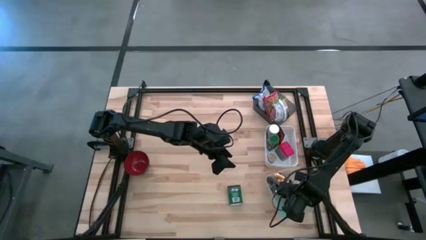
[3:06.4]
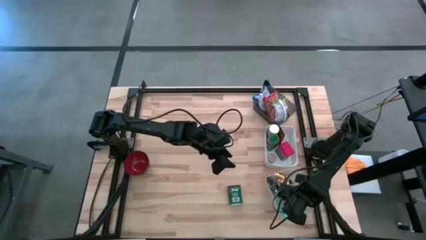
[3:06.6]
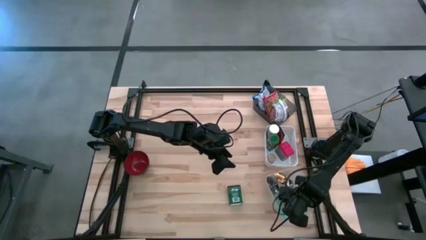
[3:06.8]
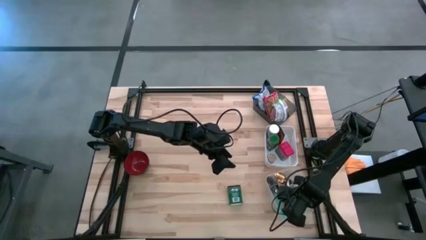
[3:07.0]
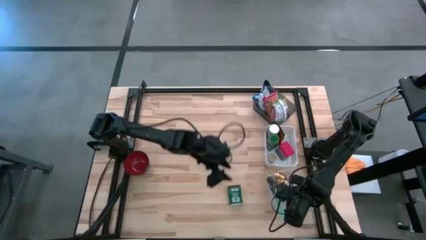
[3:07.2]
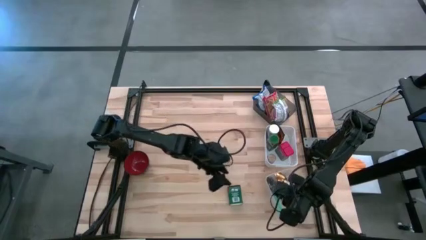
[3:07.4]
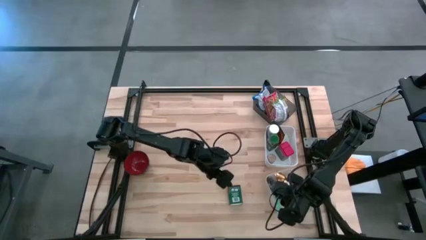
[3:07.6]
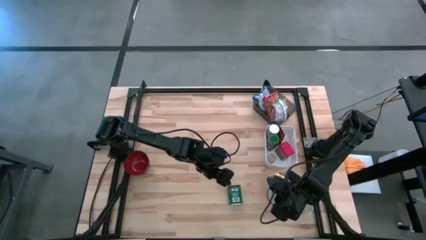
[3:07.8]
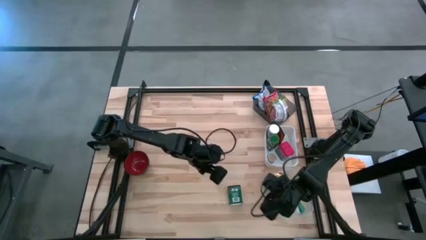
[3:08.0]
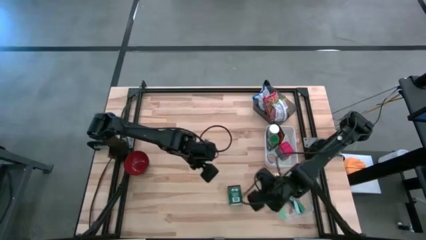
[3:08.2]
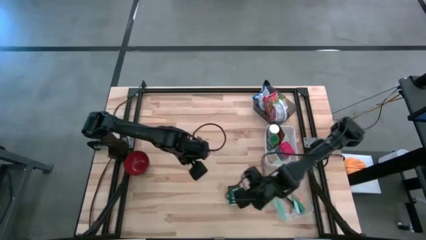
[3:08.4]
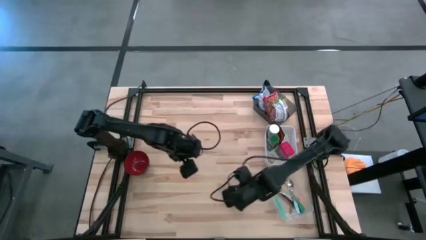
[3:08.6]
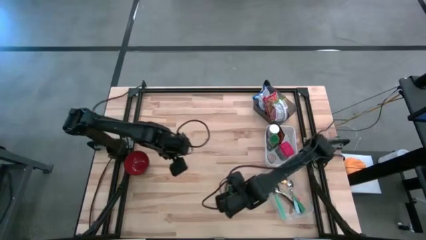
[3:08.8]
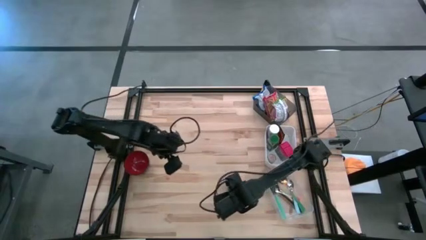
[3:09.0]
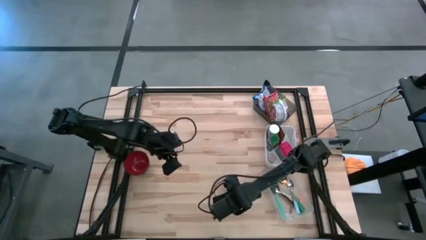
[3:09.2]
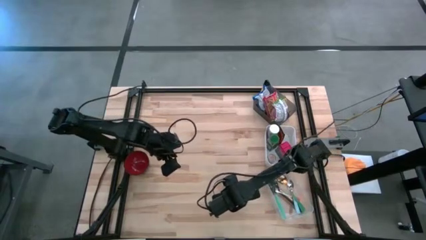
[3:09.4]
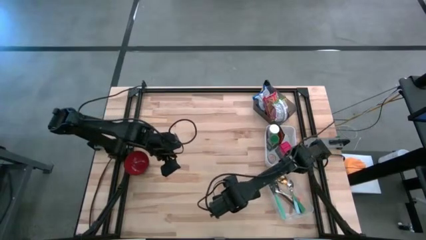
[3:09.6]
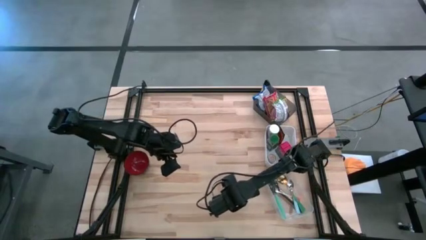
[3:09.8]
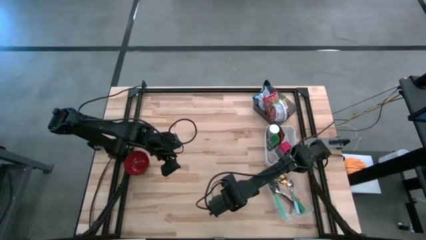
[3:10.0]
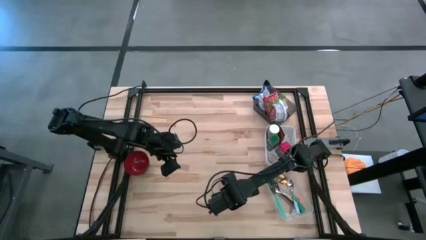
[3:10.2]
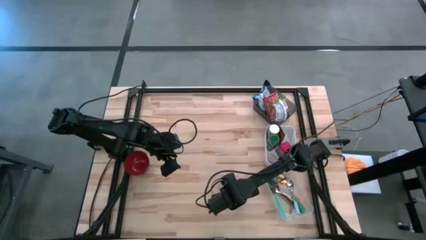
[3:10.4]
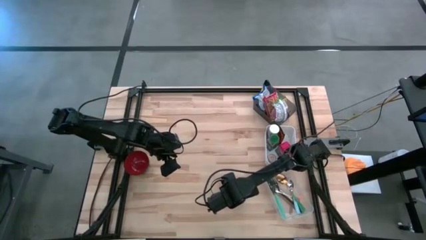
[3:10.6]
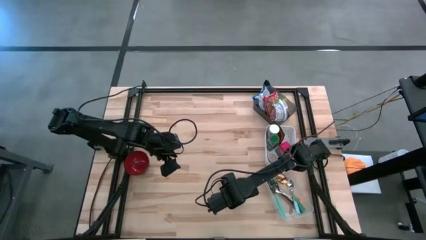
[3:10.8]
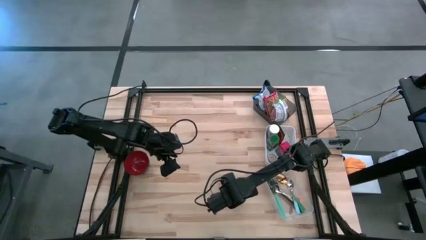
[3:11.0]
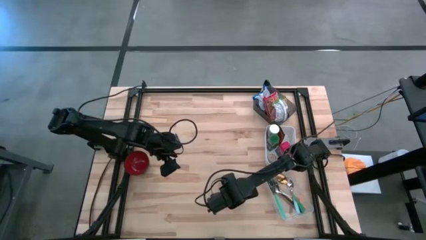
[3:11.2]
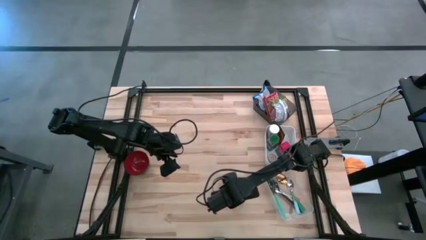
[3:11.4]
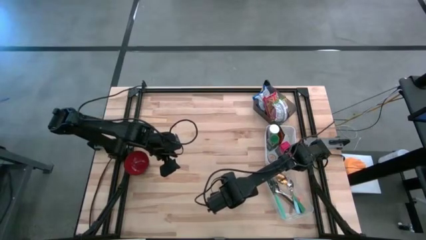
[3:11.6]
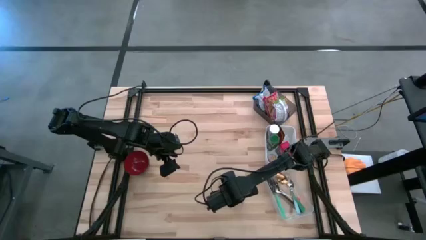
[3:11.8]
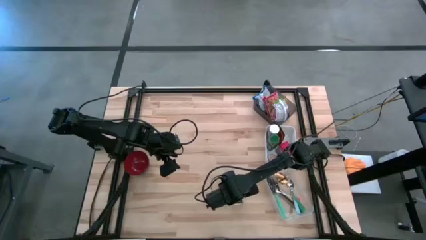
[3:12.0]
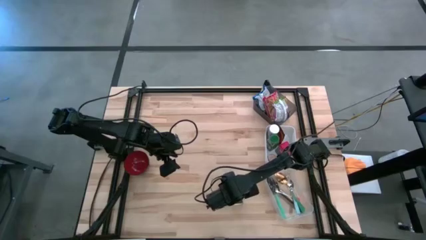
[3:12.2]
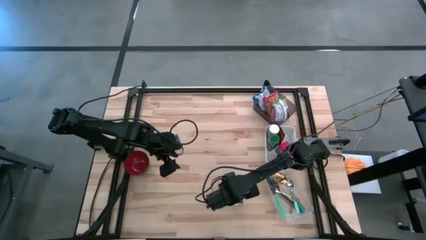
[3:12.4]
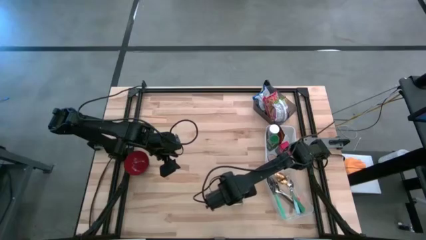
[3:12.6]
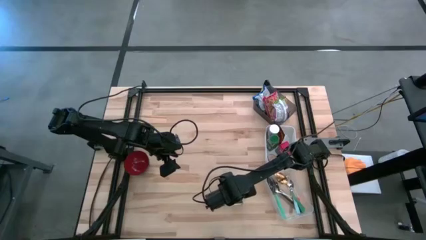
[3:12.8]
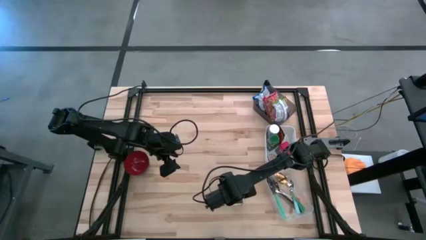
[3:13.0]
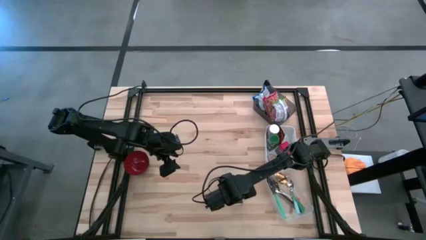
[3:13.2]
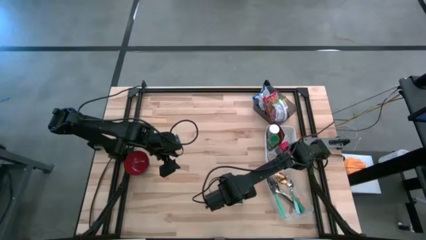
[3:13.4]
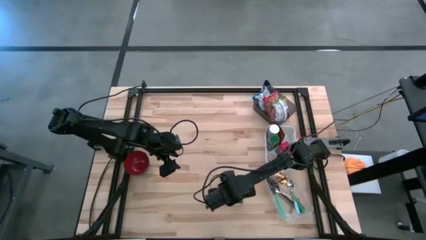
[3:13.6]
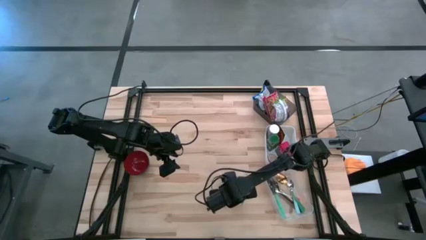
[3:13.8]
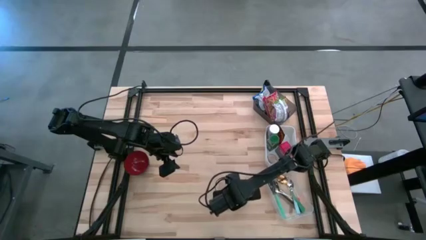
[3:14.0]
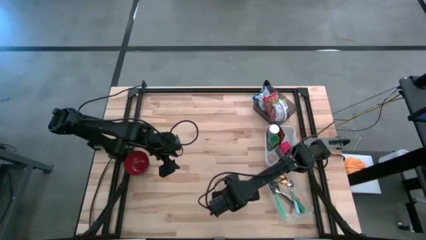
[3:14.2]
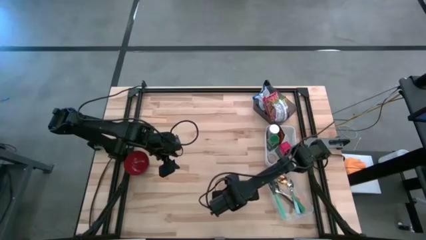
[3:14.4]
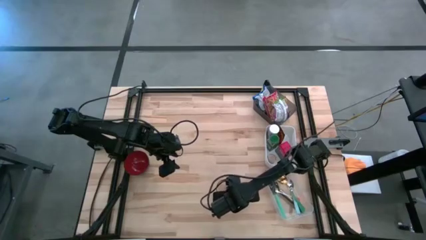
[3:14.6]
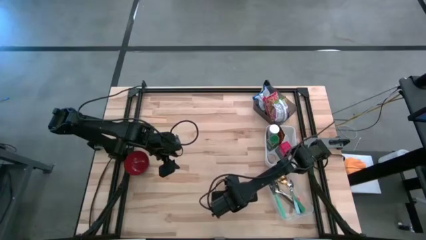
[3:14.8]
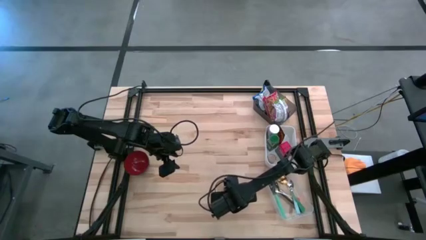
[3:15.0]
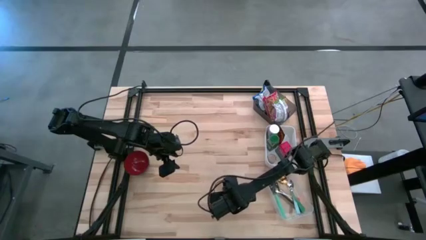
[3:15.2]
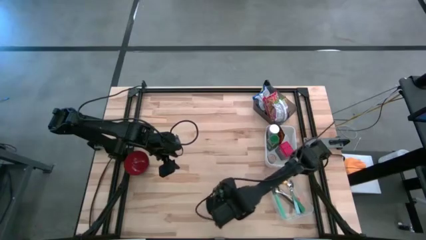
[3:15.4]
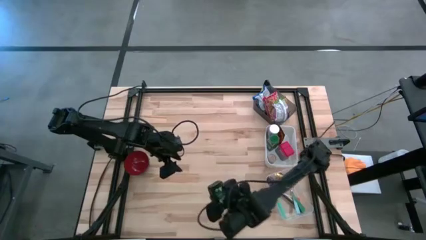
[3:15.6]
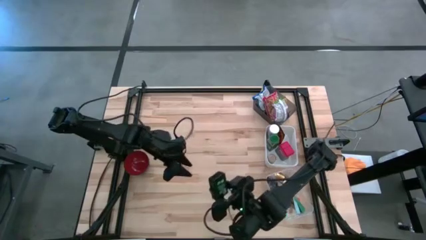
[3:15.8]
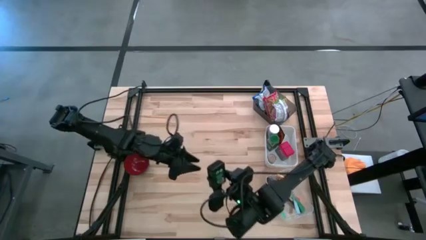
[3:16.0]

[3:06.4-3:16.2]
Put the green seasoning can into the white bin
